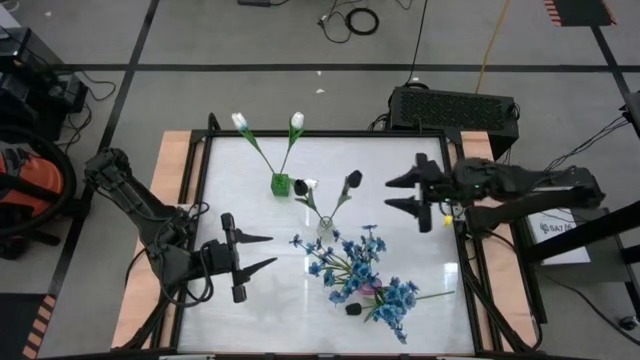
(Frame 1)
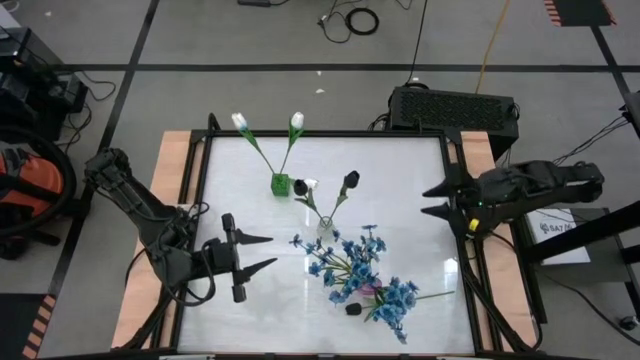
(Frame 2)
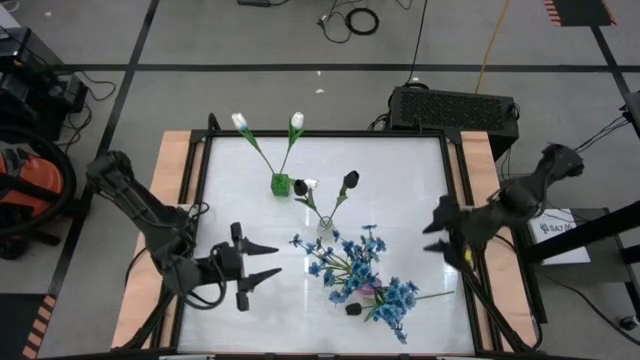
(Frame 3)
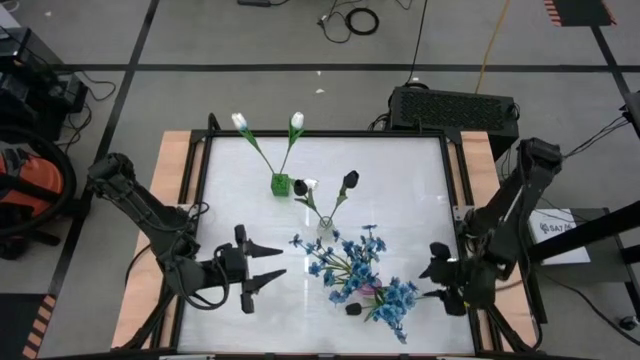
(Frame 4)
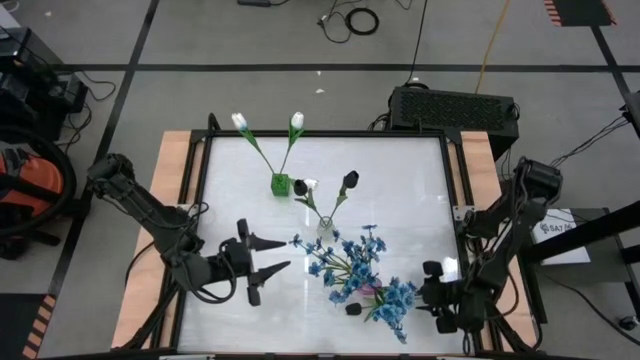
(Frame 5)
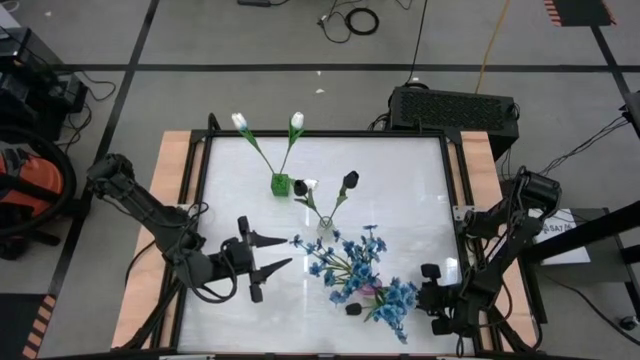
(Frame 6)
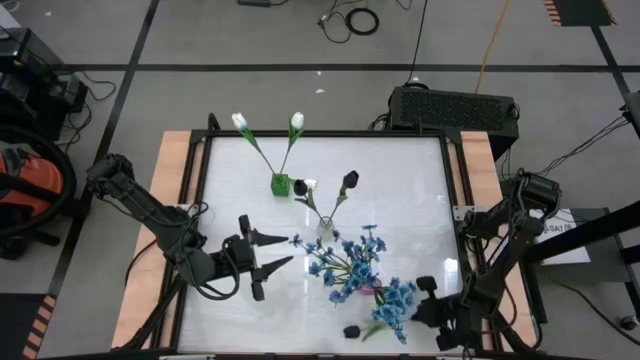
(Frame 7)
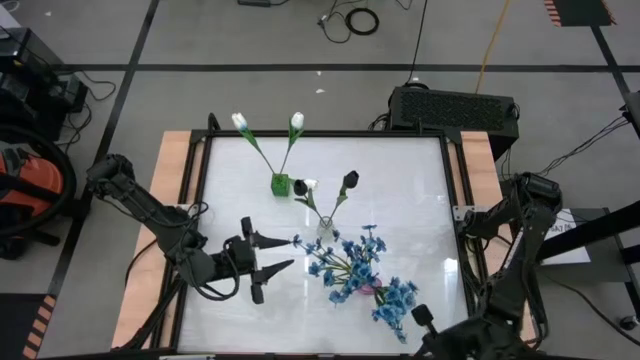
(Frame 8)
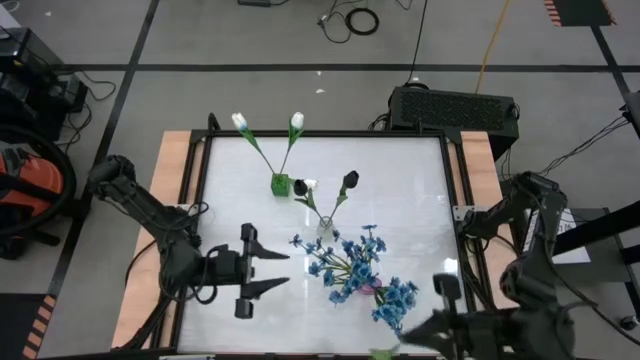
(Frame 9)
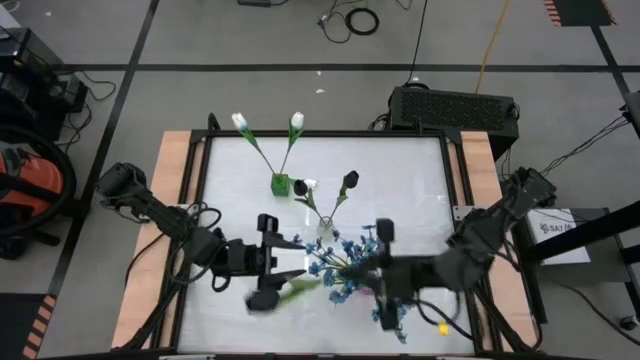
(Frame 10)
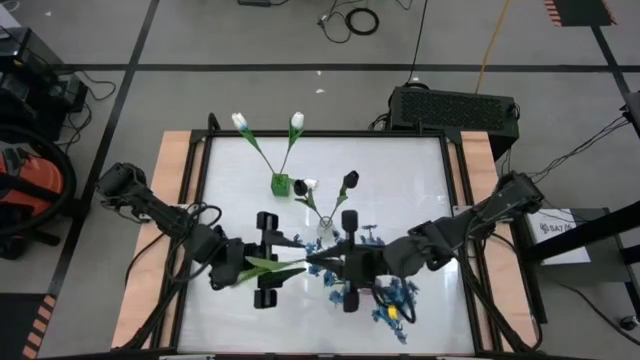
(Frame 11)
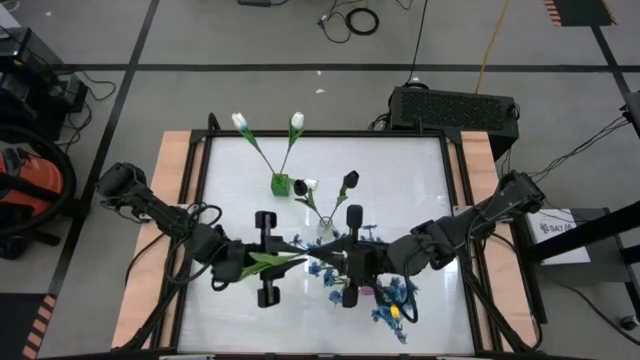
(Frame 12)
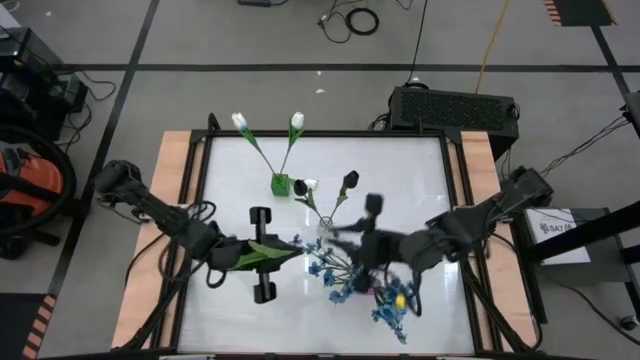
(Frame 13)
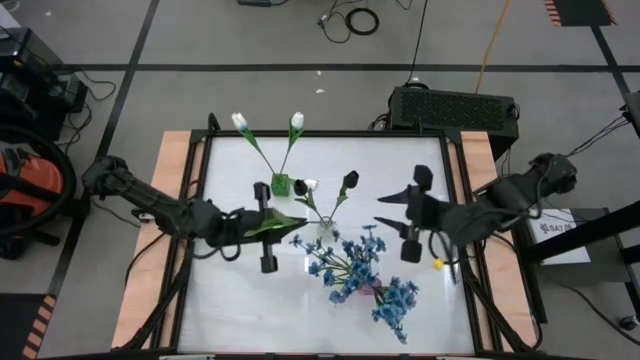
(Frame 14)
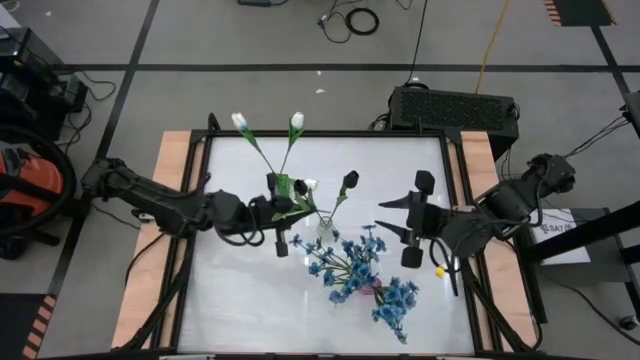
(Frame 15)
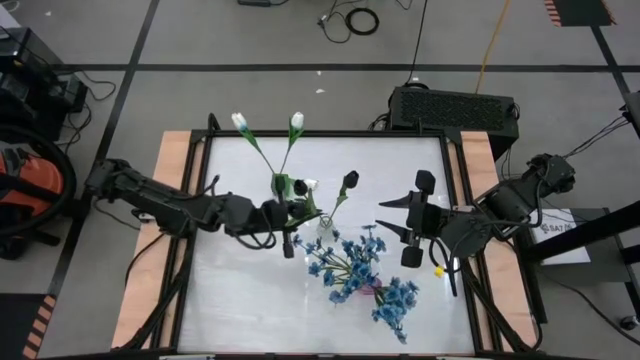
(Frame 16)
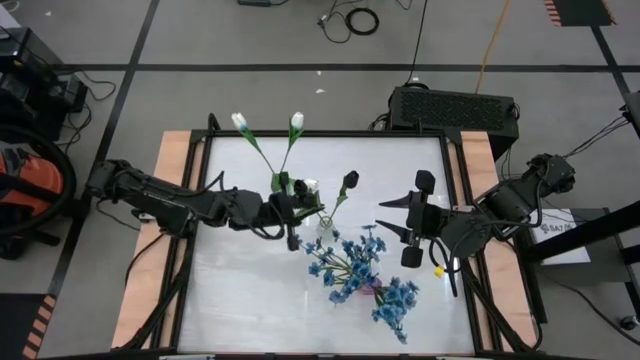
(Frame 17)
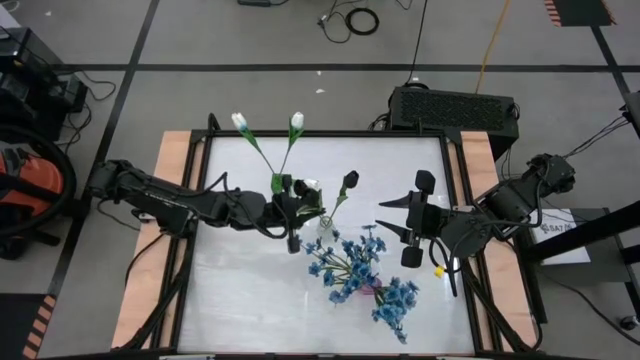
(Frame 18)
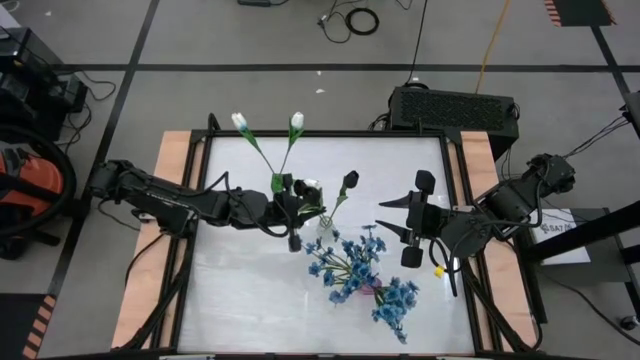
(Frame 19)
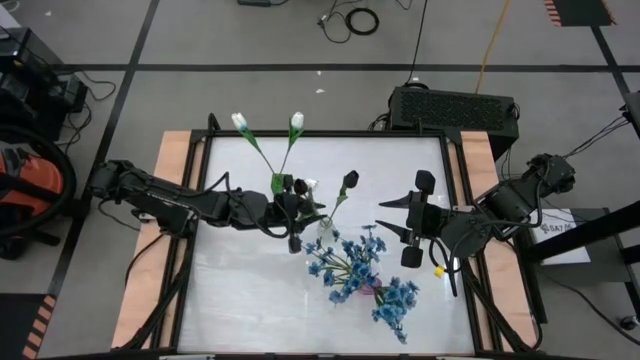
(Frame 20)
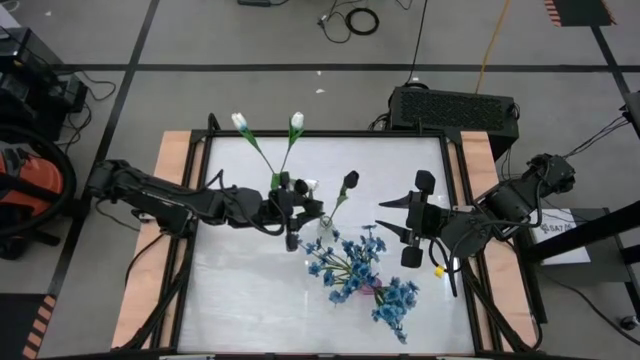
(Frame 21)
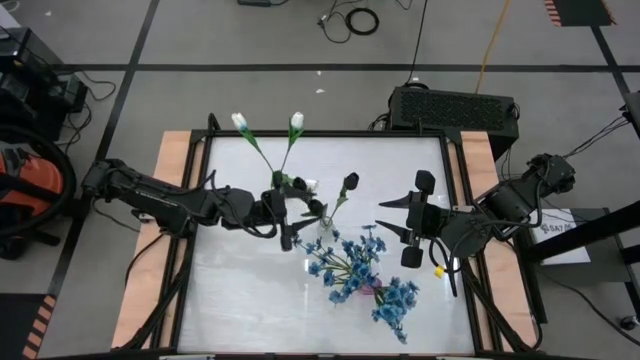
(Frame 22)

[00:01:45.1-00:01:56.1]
Task: Sort flowers into vase by color
Put the black flower into the transparent vase

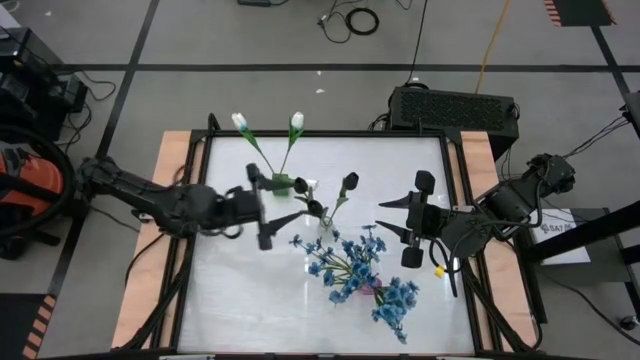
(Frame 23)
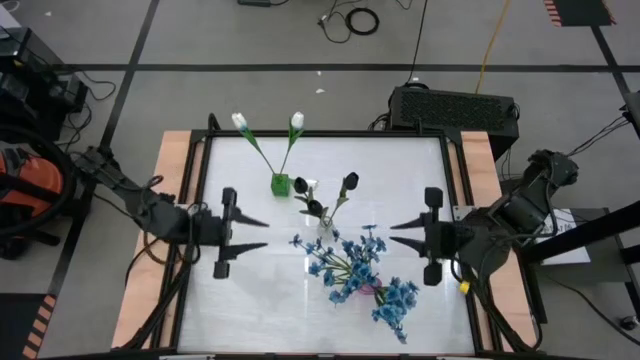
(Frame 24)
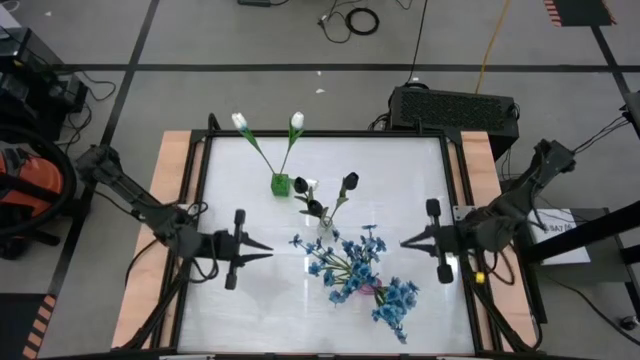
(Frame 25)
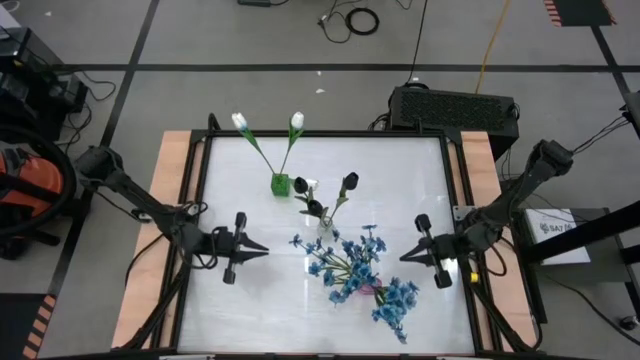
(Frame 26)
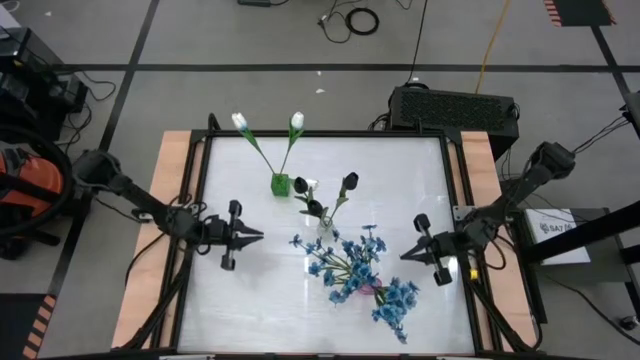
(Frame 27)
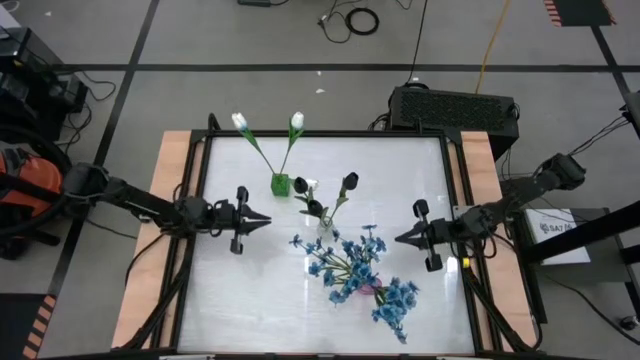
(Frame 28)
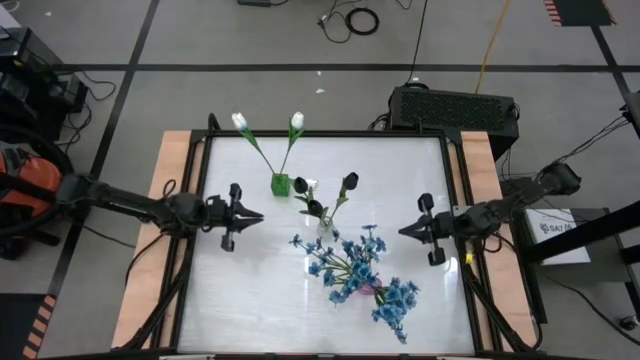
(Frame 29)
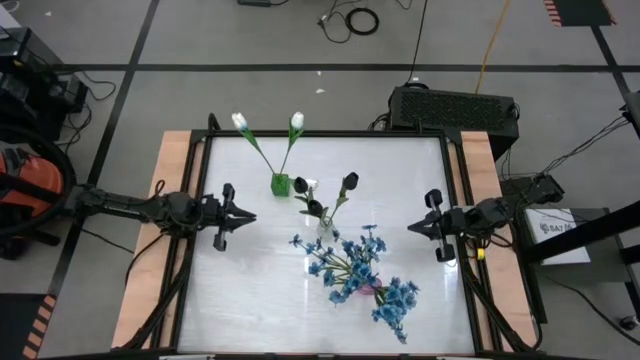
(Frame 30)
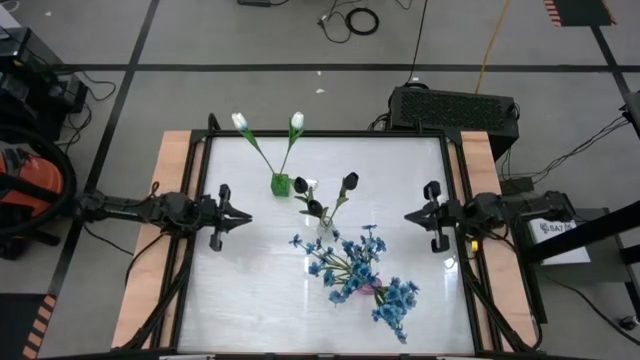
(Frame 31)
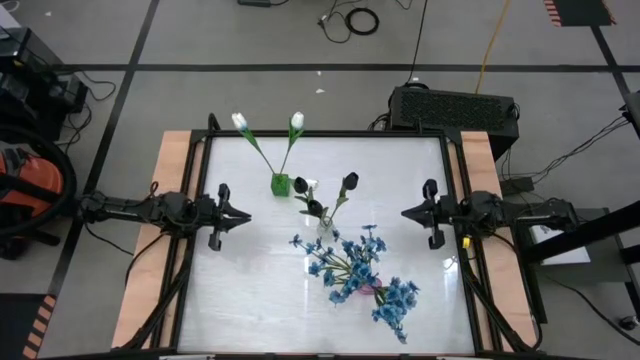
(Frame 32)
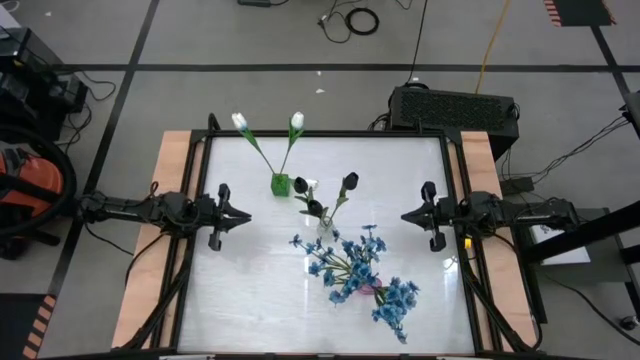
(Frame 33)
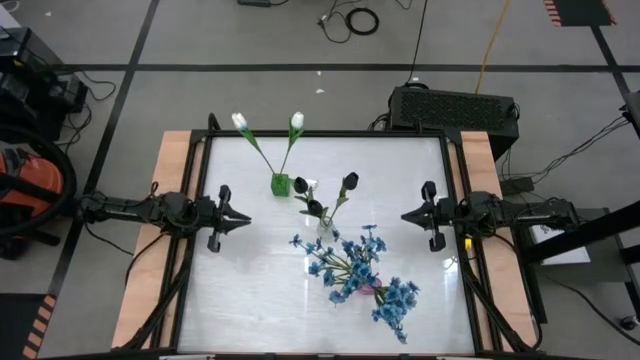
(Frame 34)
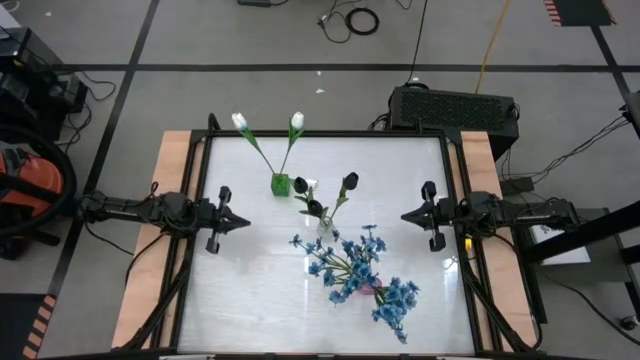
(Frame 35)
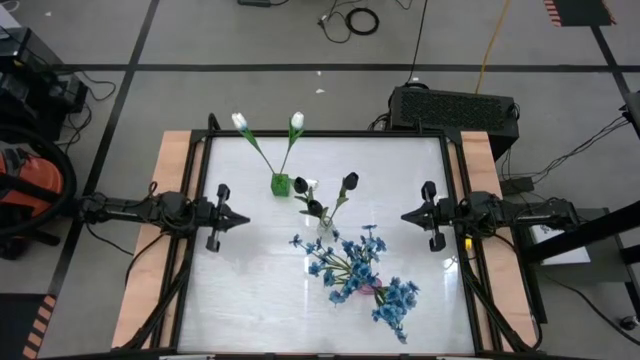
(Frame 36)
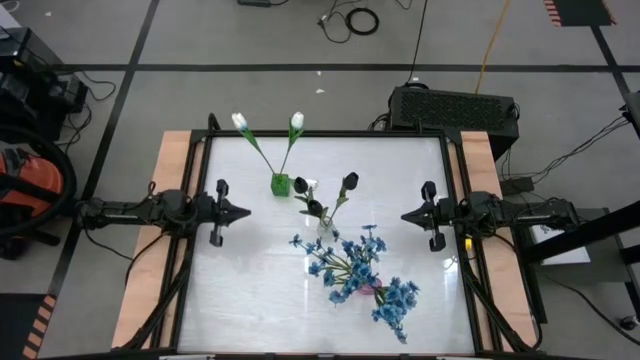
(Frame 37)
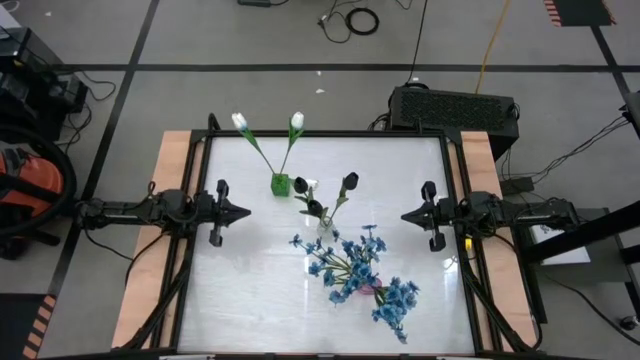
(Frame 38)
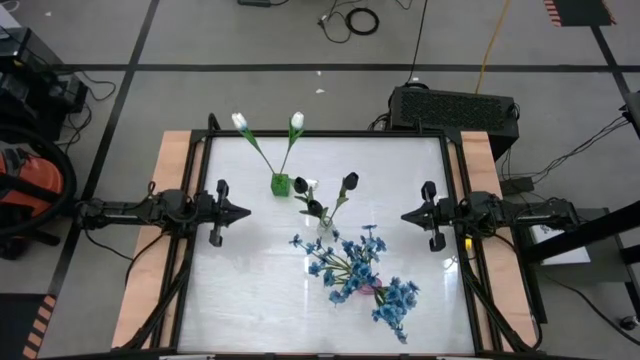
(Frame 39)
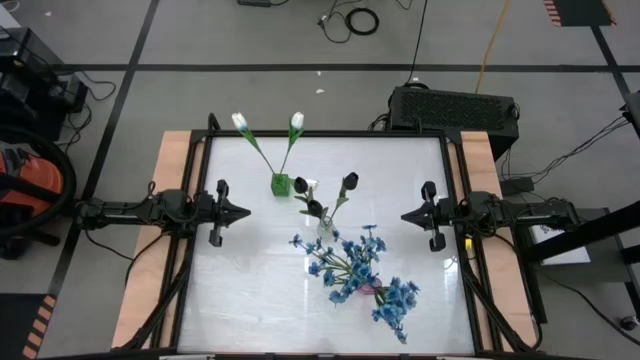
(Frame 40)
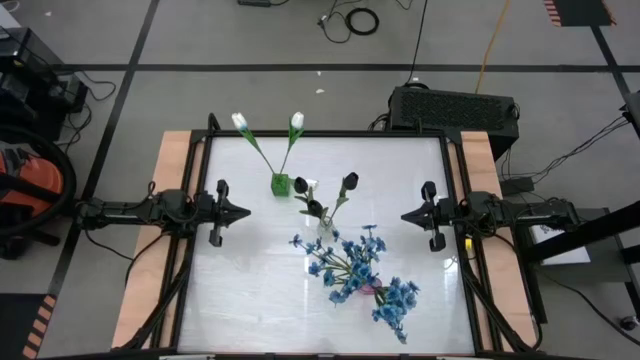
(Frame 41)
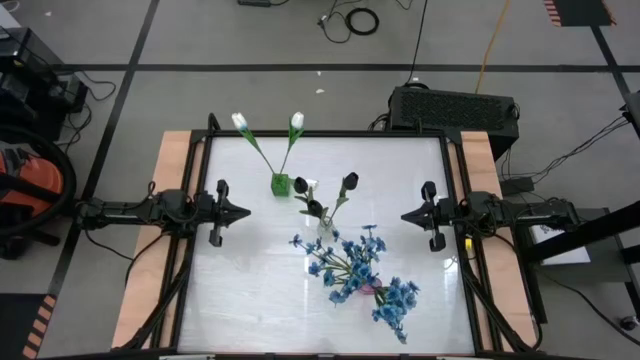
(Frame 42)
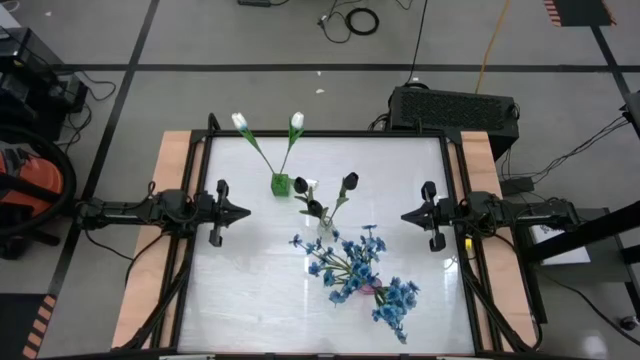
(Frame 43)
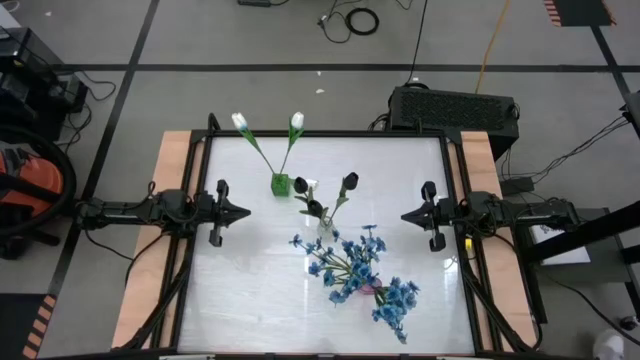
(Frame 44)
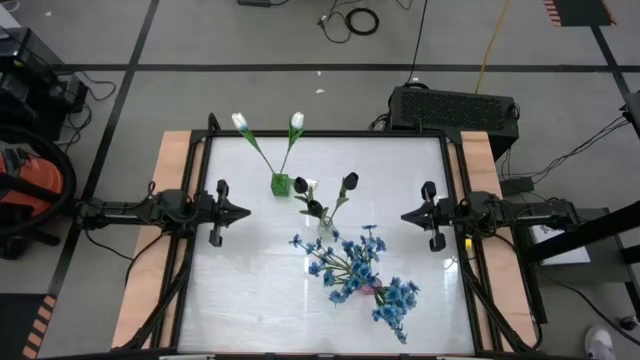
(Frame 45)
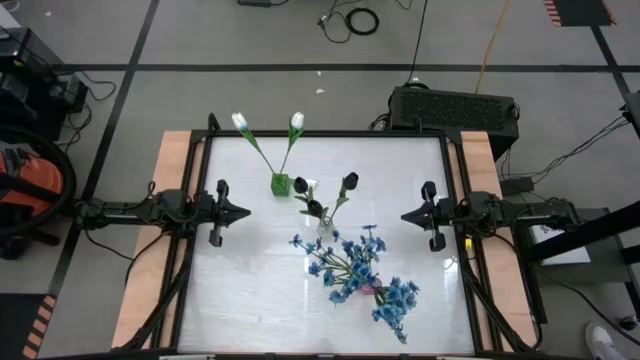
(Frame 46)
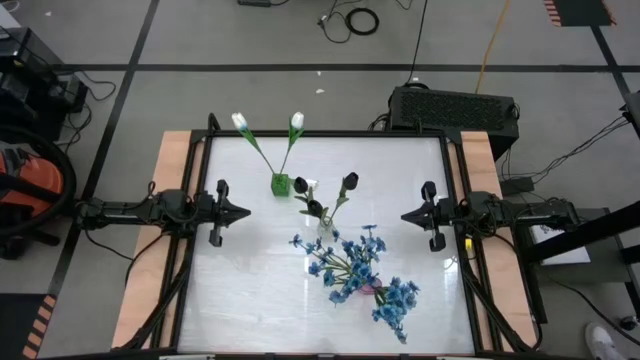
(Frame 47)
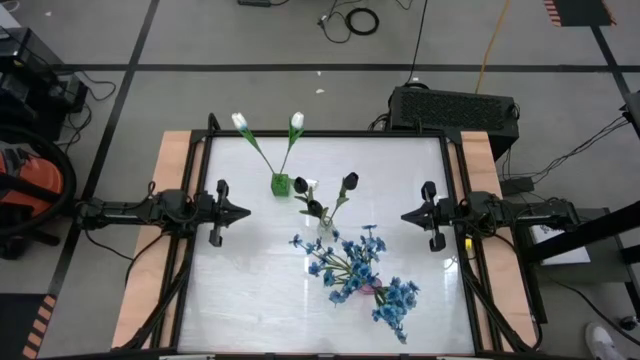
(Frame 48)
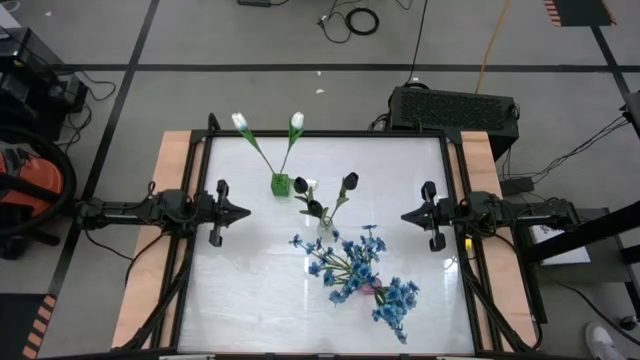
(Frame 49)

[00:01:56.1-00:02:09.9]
Return to Home Position
